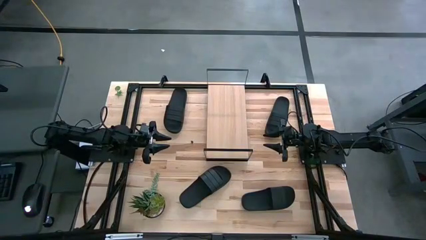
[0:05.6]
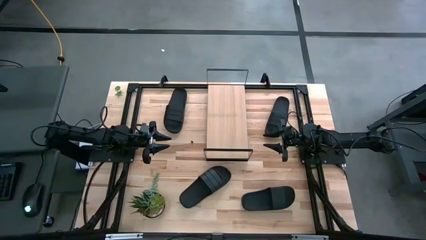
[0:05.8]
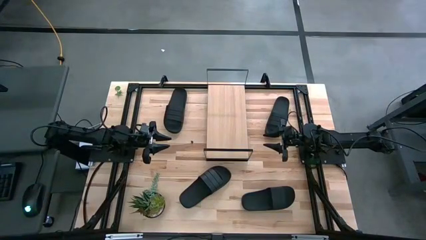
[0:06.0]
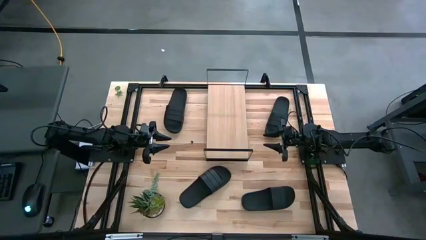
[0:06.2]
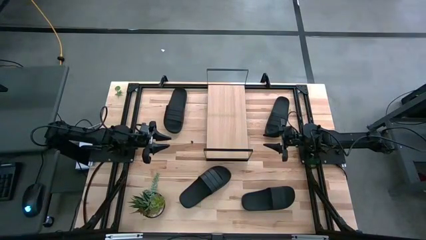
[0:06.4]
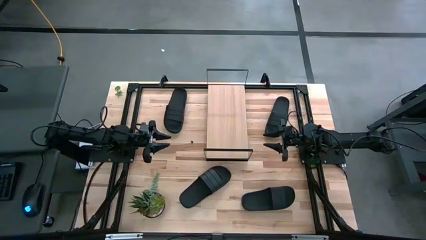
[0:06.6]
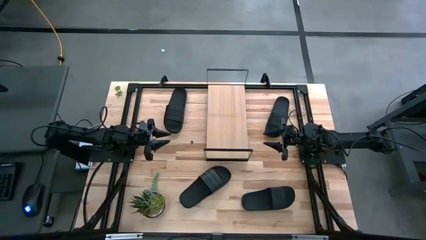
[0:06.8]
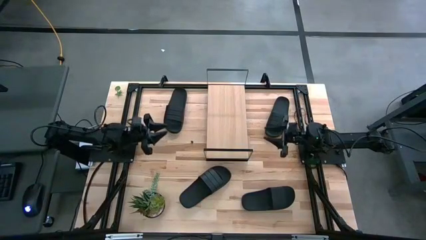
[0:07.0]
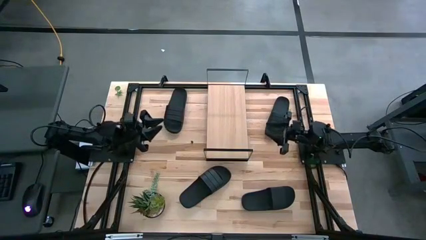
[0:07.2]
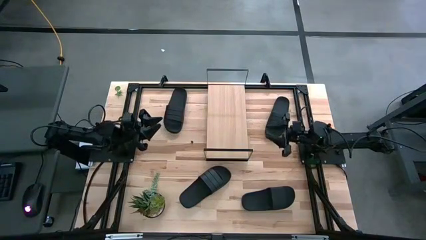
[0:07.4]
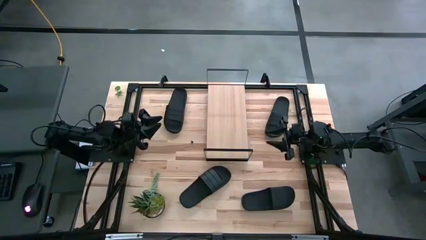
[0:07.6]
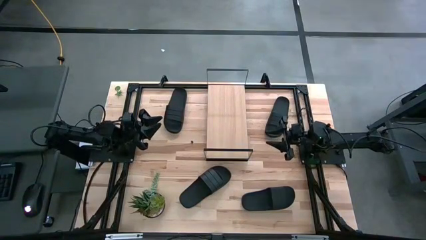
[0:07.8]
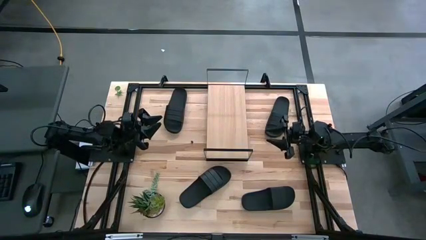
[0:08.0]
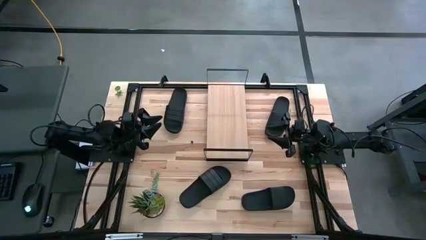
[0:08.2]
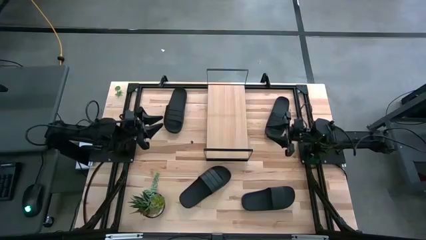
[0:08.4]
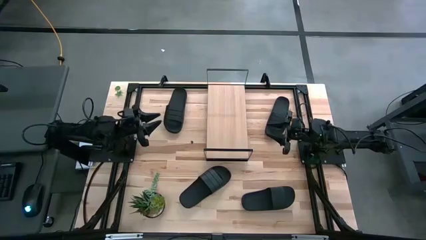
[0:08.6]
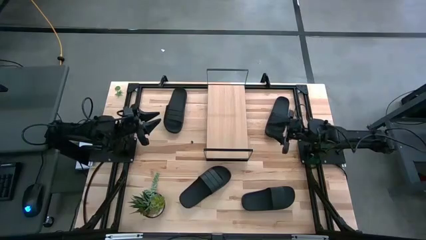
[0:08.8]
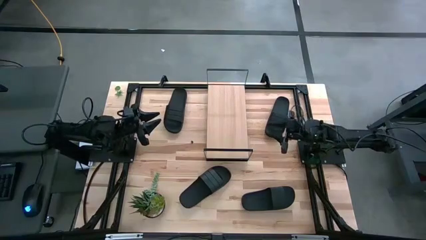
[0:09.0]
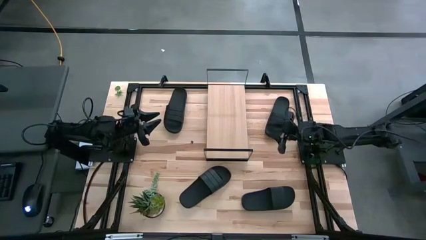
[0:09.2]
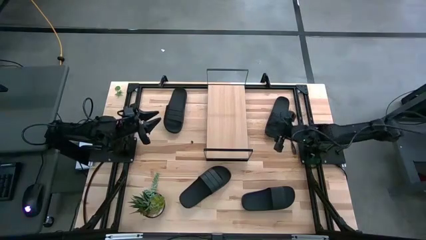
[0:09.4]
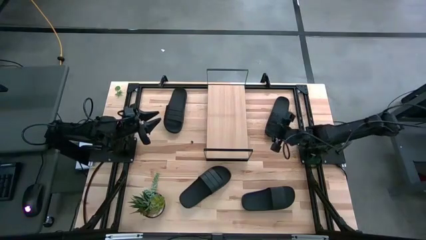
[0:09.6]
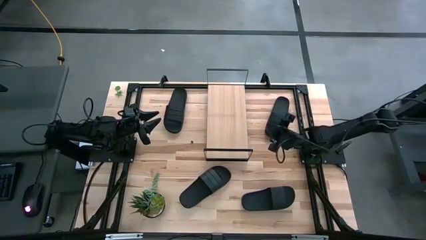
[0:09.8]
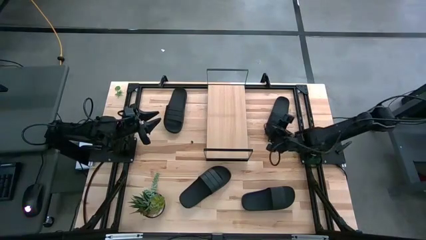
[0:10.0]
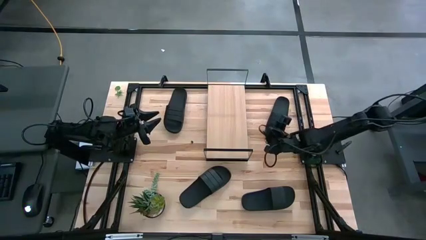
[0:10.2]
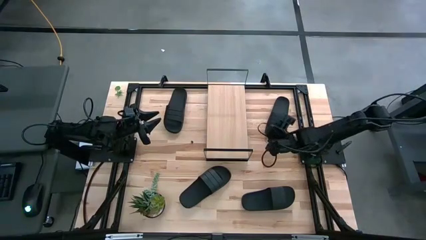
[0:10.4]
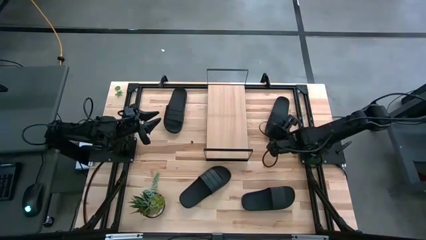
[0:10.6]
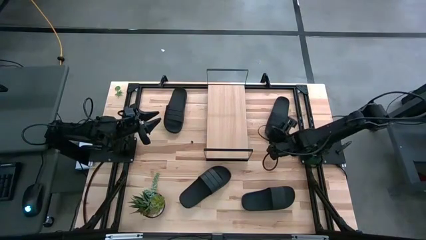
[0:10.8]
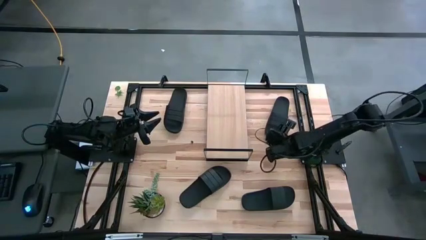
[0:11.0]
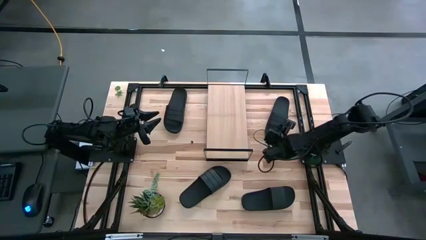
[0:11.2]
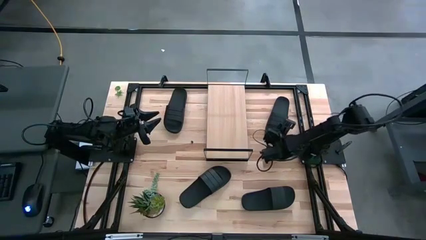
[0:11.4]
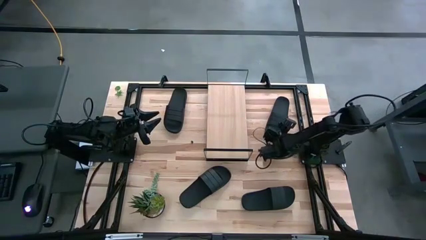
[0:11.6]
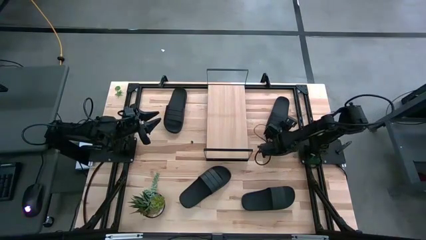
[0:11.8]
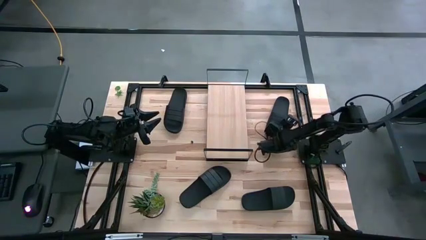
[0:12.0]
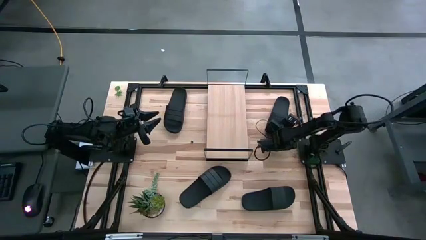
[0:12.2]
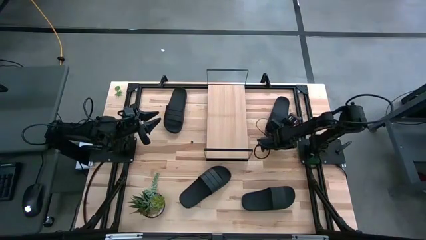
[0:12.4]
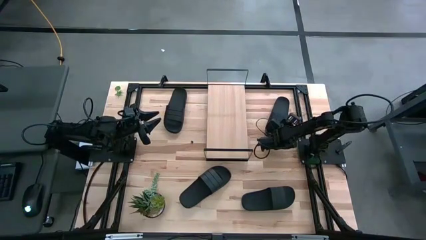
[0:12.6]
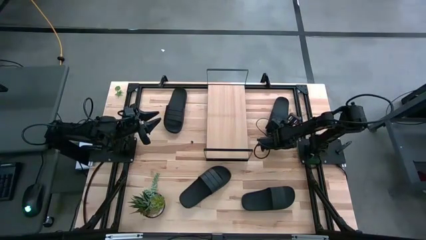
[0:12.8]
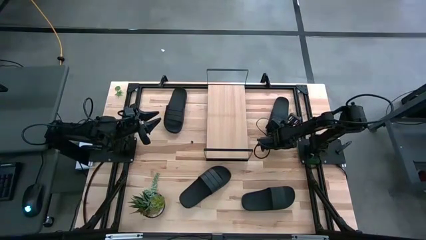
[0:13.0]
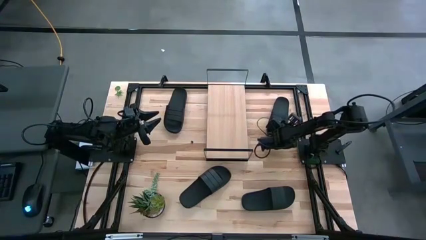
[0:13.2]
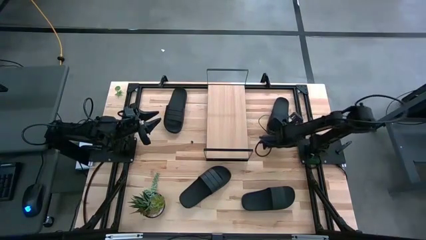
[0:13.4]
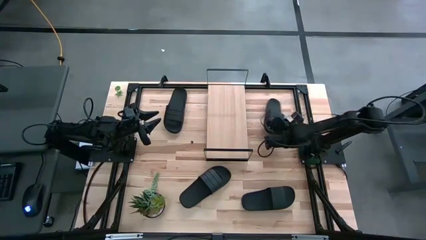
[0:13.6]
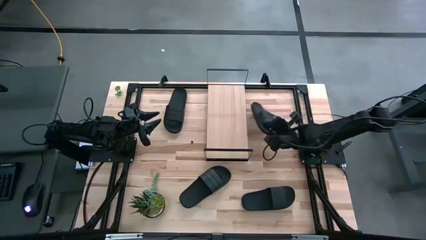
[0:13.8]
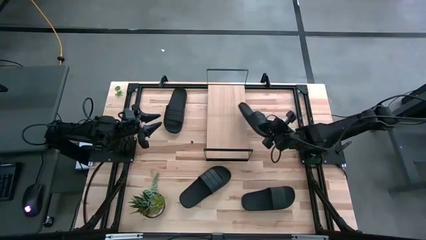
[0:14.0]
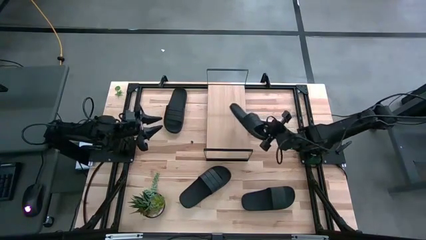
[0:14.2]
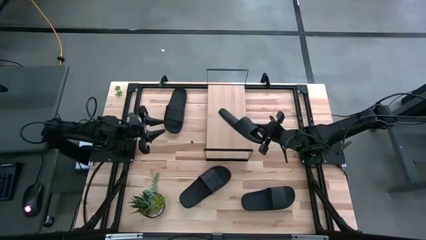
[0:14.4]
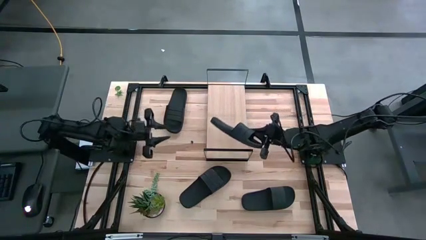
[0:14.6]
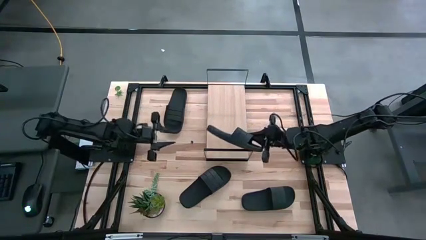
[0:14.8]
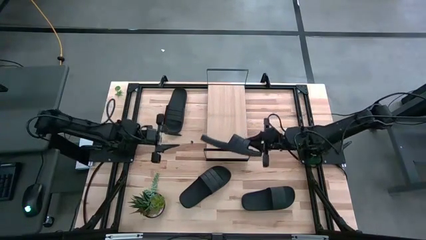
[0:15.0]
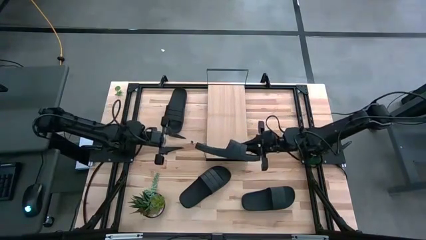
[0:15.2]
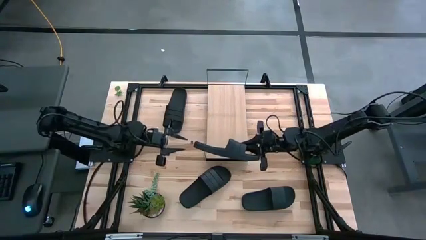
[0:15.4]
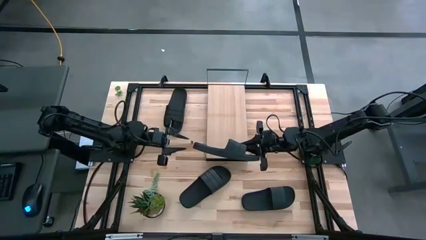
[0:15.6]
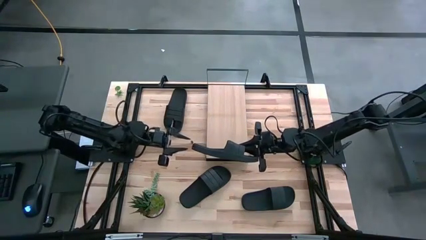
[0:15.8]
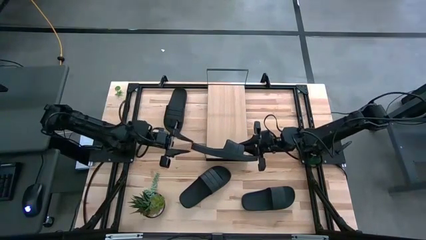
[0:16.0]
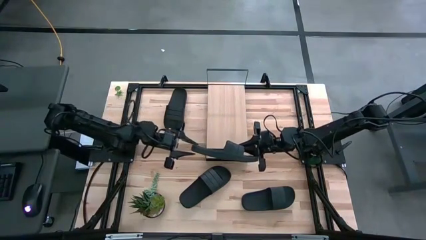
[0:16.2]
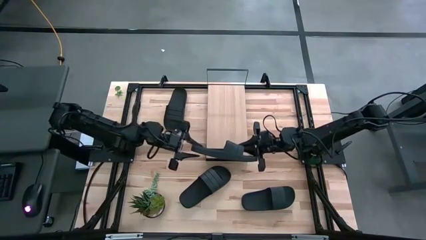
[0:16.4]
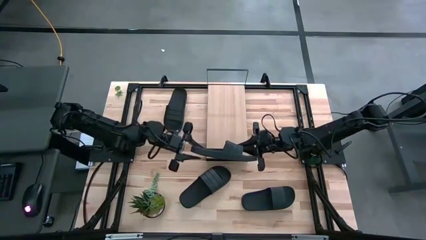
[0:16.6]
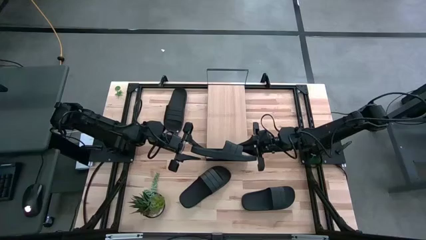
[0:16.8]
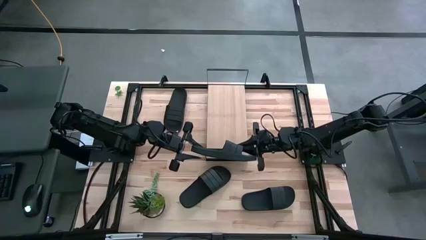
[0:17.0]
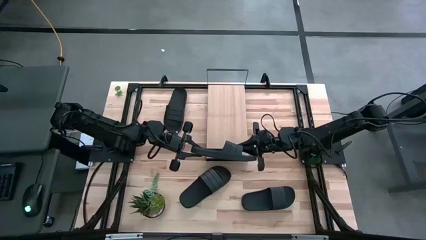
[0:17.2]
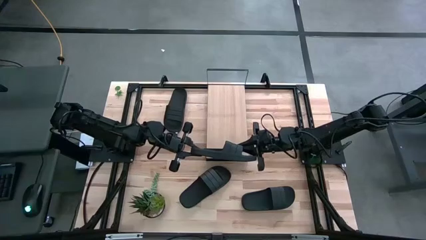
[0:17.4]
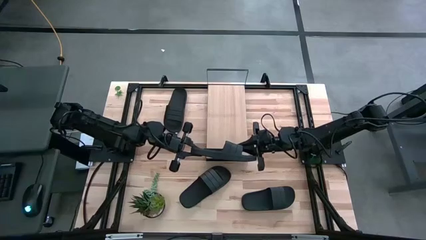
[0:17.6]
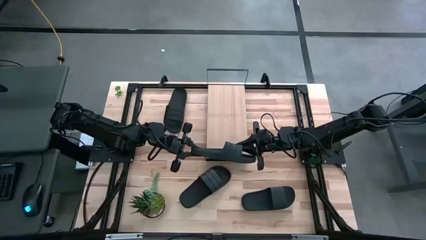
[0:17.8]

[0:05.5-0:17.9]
Task: Pick and place slides into the shelf
Put the top right black slide on the shelf
